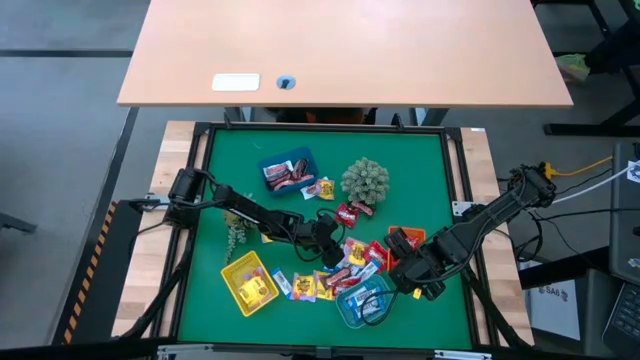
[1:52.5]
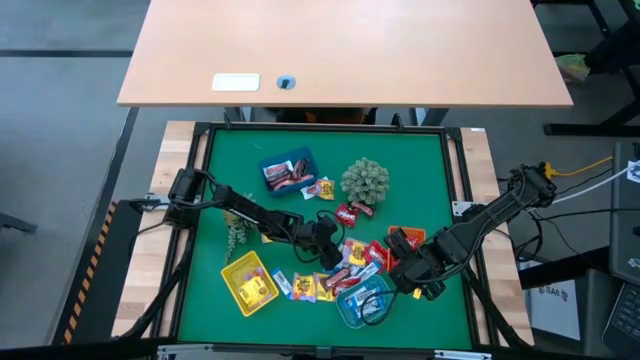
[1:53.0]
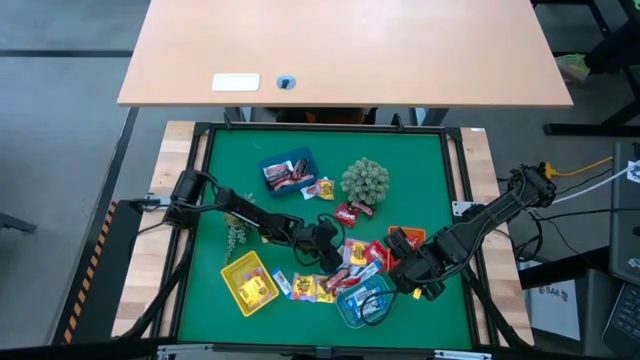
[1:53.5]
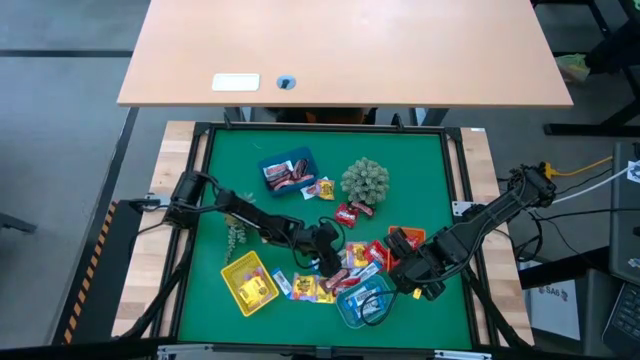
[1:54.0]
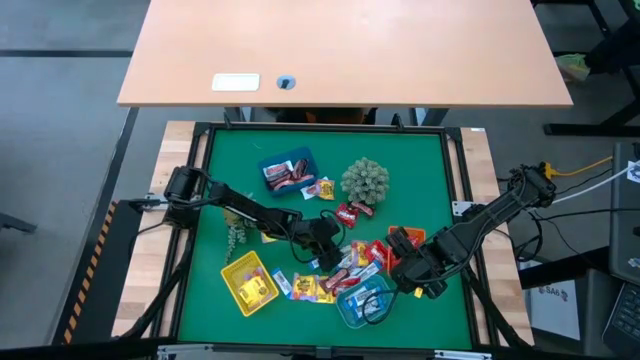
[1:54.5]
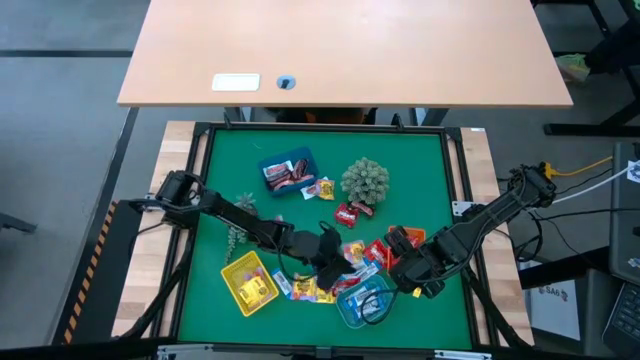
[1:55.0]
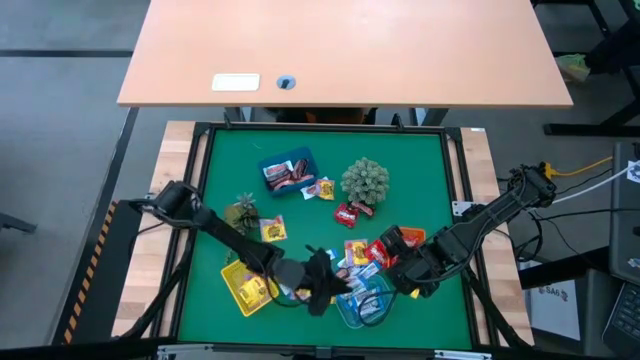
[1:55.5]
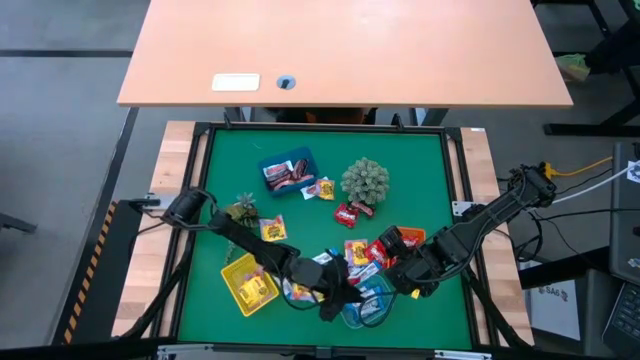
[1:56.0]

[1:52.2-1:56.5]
Task: Sort candy
Put the white-blue chocolate into the light blue bin

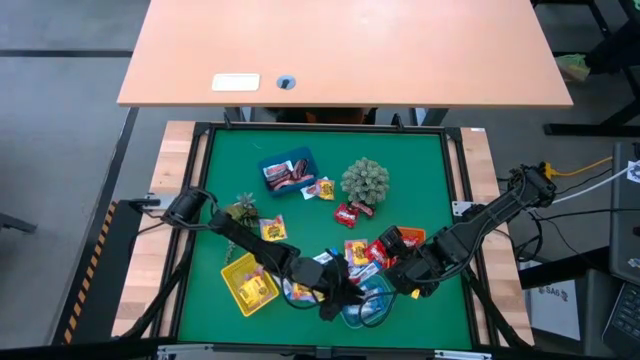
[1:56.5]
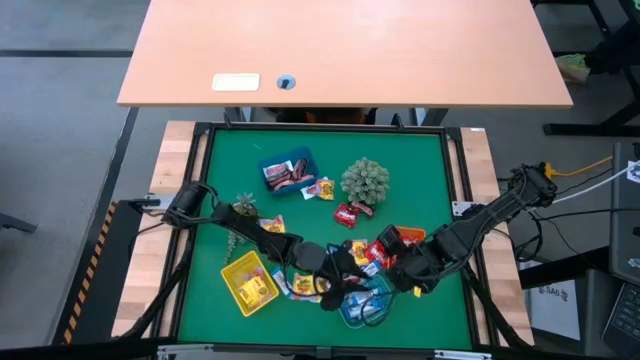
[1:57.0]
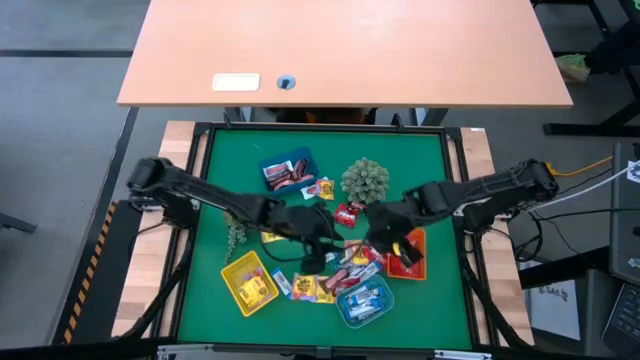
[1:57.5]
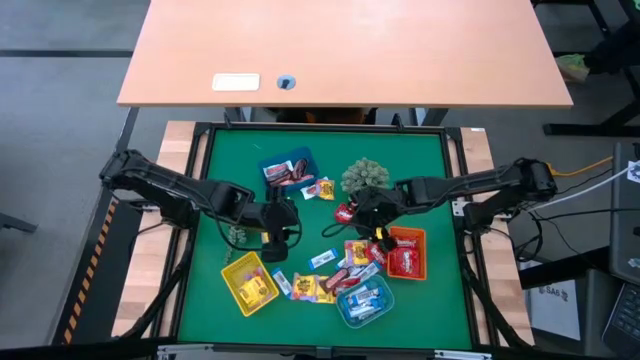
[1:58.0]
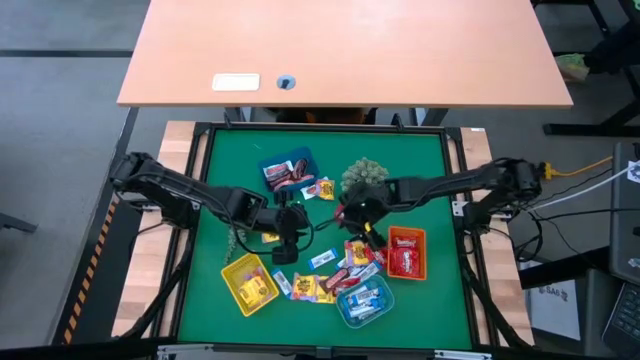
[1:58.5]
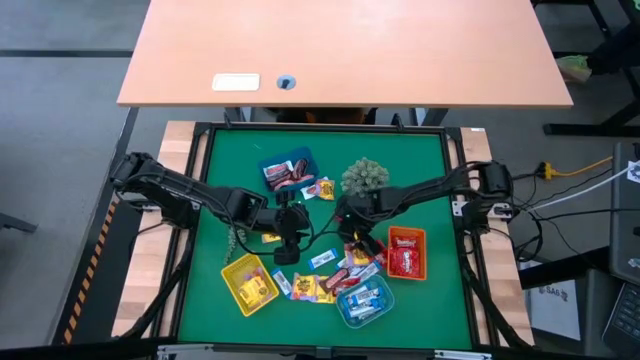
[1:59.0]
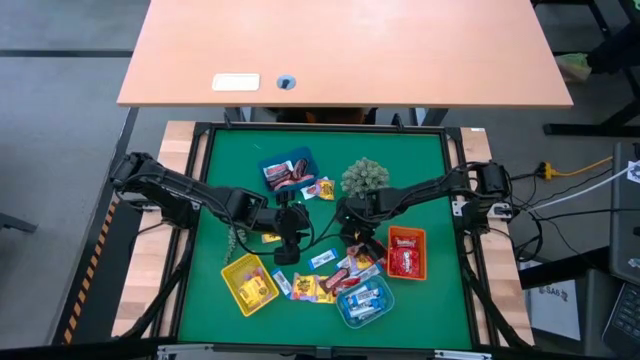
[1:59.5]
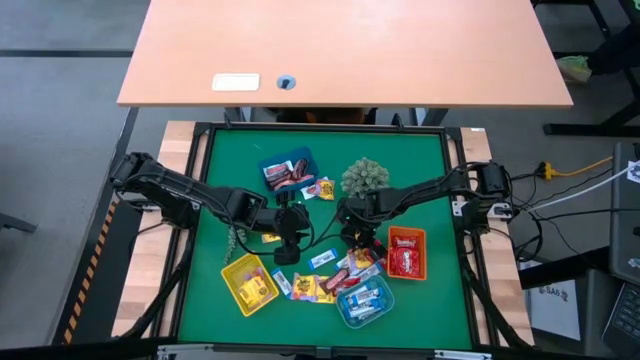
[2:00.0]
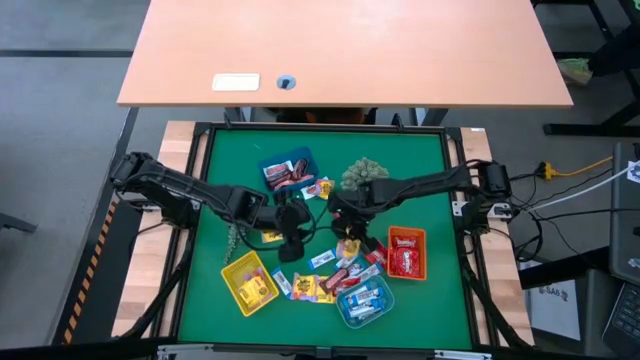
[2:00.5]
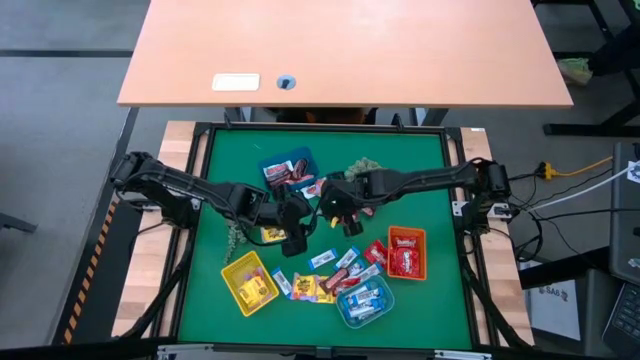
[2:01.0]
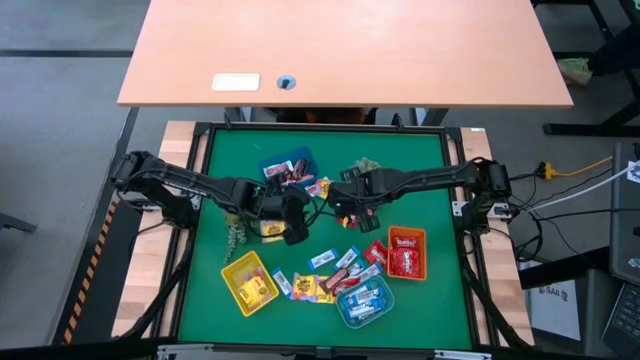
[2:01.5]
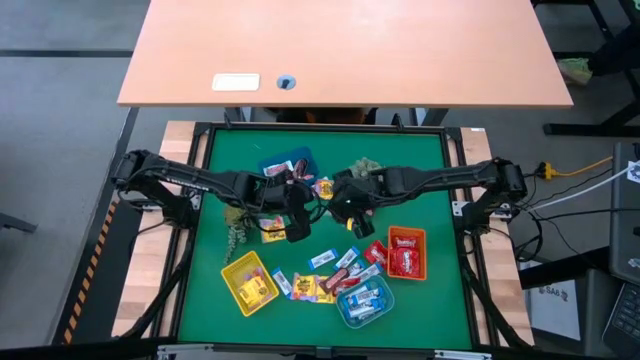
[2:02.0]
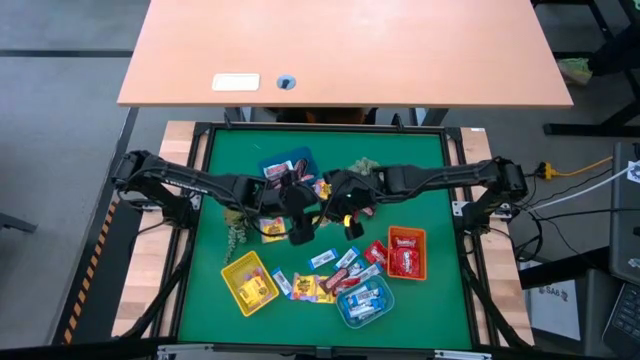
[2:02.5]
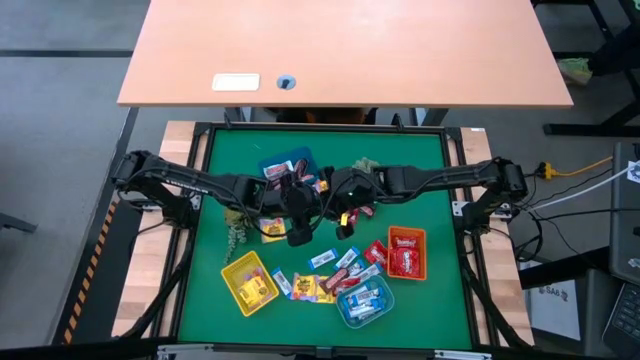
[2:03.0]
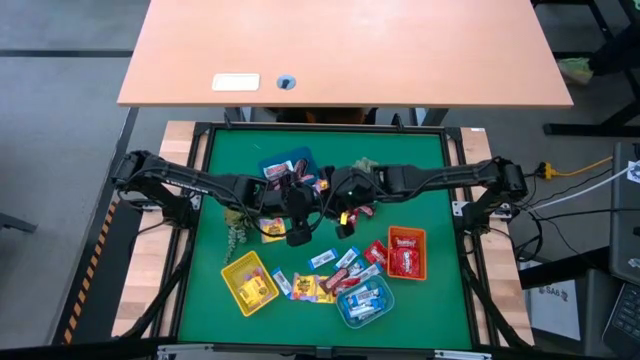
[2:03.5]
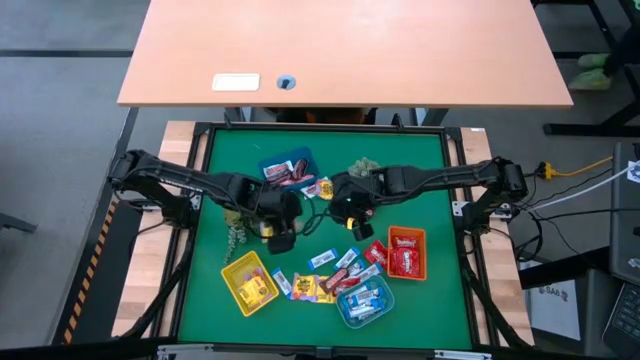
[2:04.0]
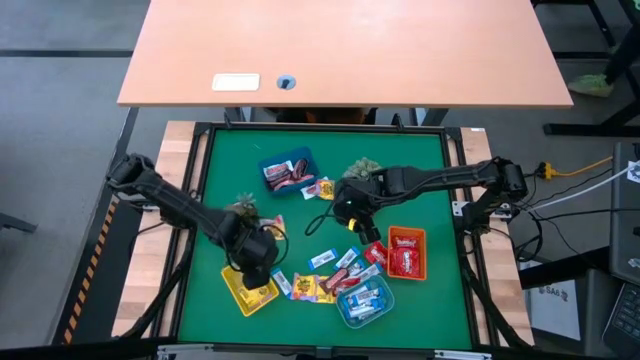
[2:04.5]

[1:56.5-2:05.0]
Put the yellow candy into the yellow bin

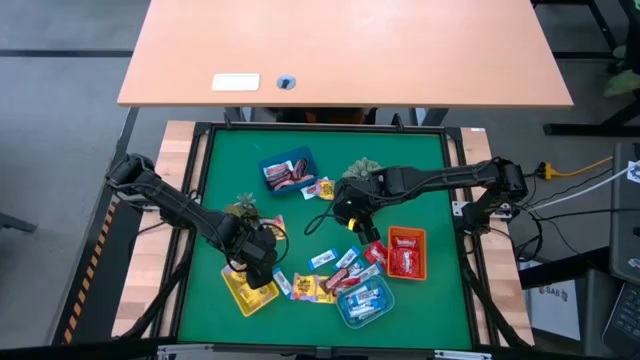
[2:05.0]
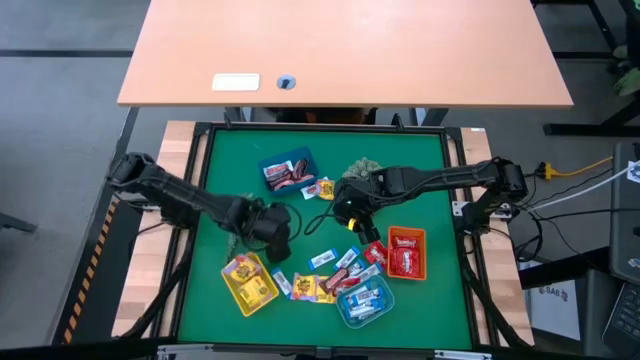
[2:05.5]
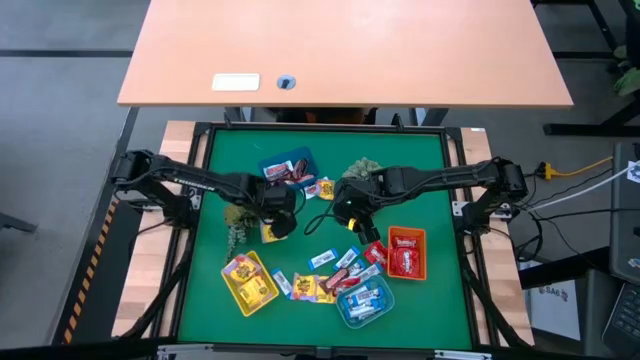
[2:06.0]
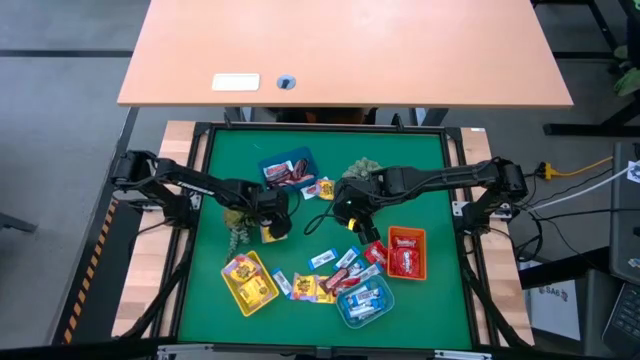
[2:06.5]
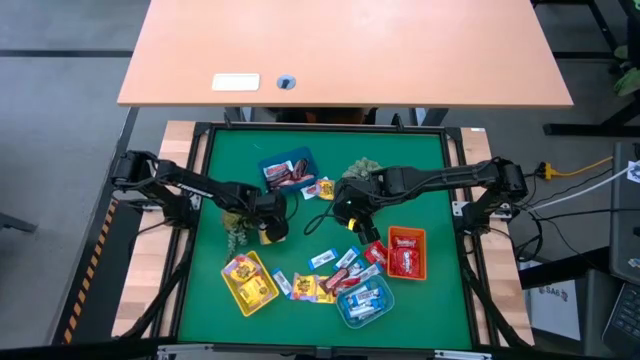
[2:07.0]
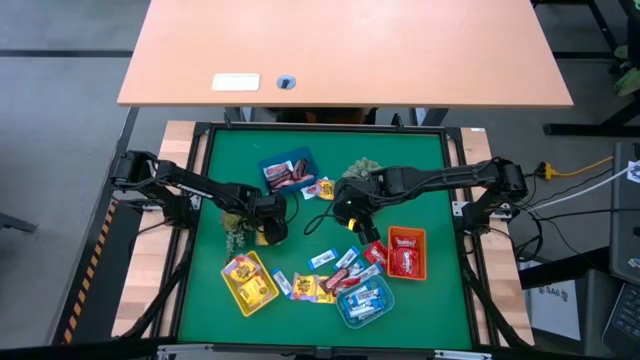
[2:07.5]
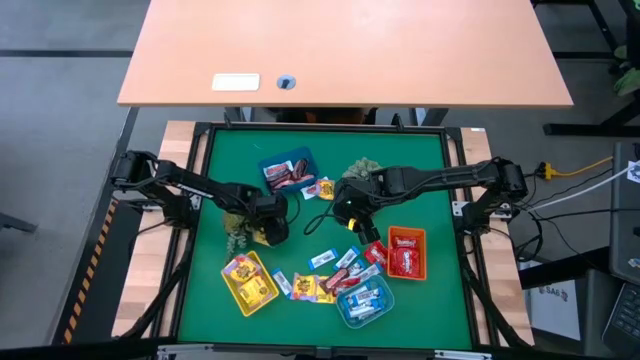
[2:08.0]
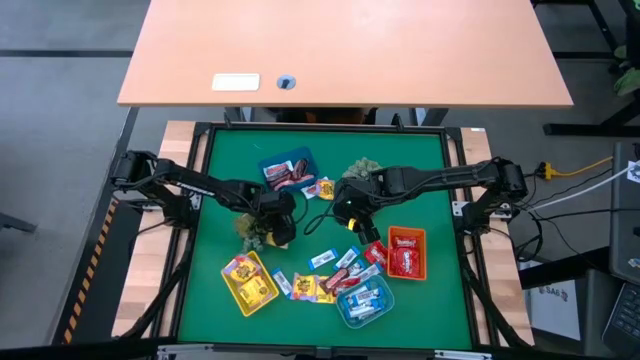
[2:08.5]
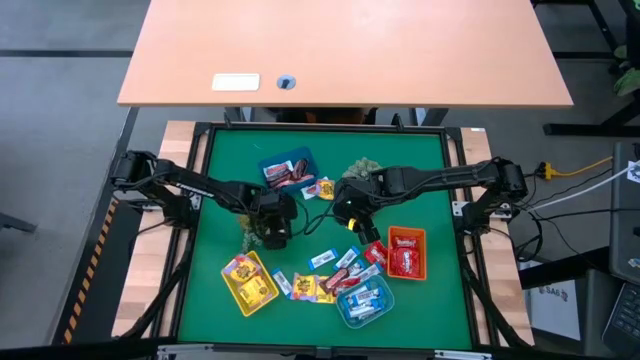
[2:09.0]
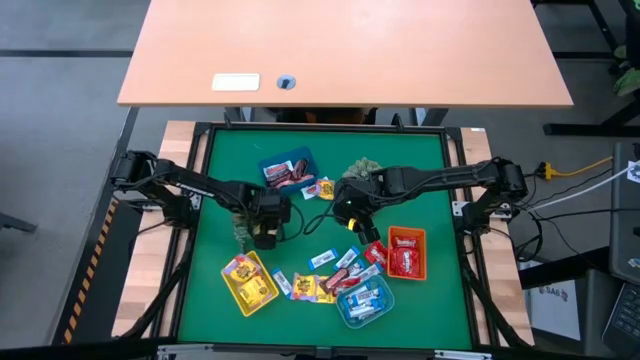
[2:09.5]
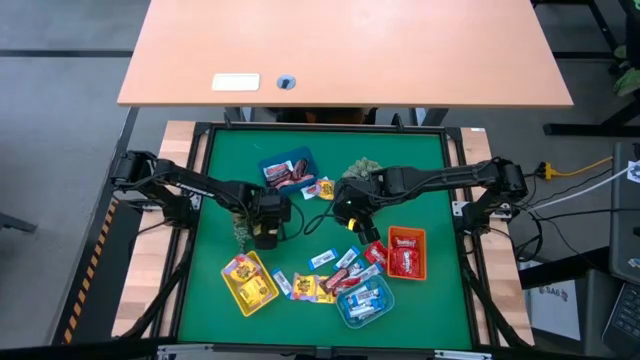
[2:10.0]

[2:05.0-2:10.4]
Put the yellow candy into the yellow bin

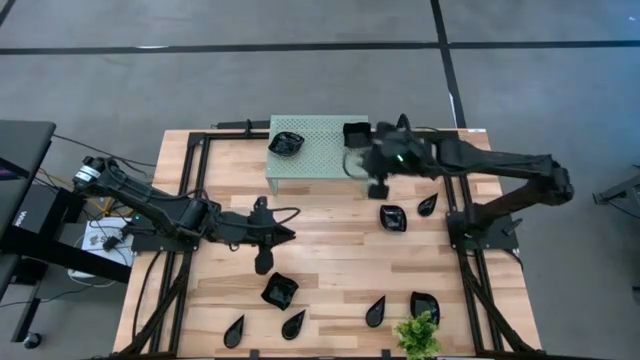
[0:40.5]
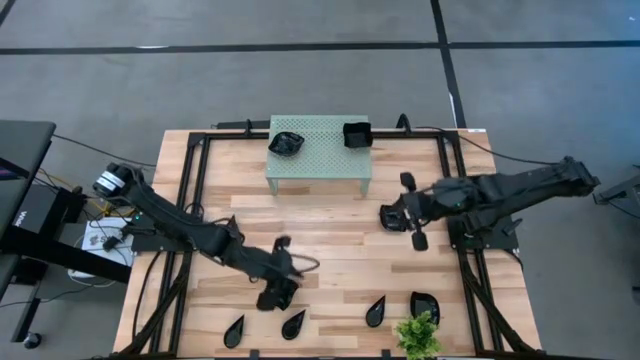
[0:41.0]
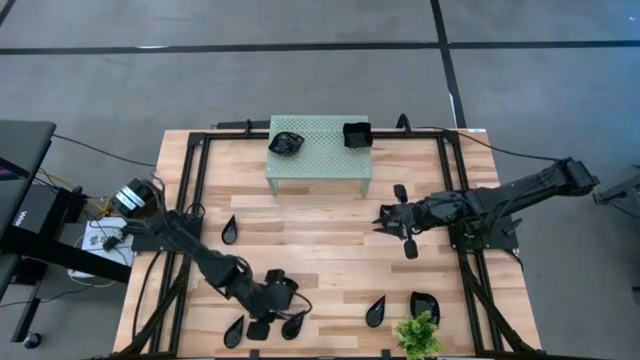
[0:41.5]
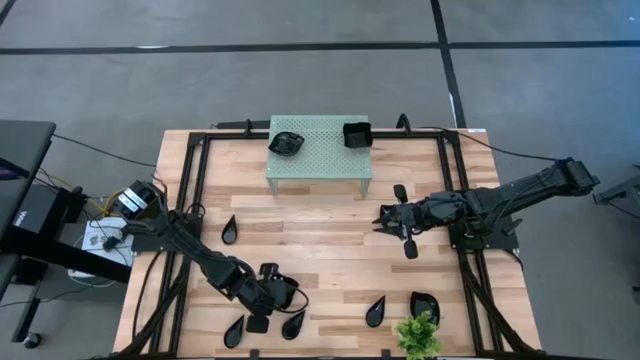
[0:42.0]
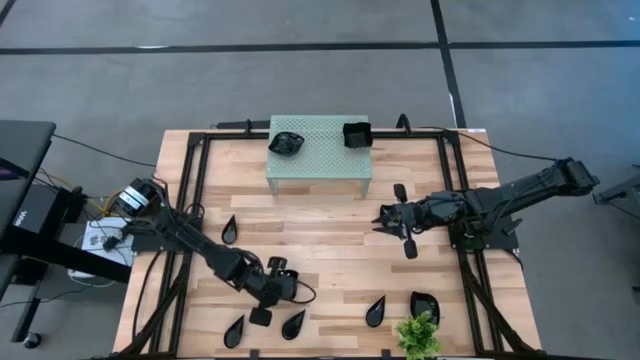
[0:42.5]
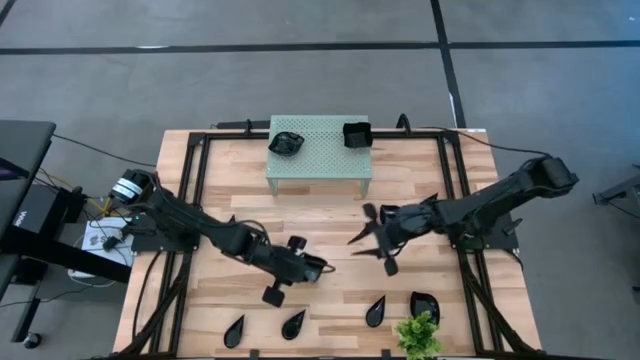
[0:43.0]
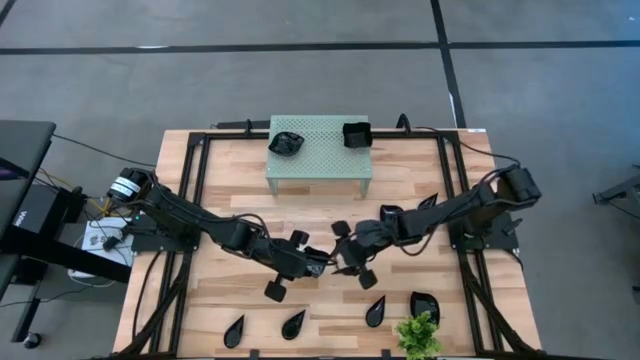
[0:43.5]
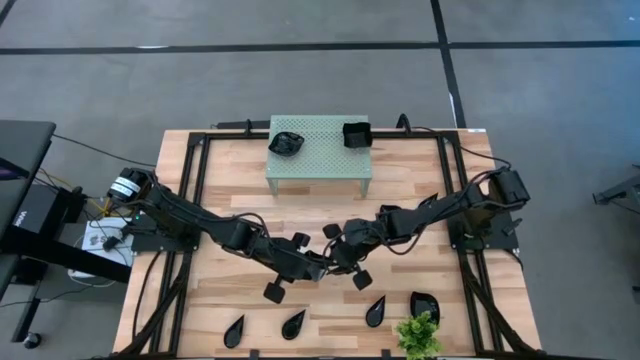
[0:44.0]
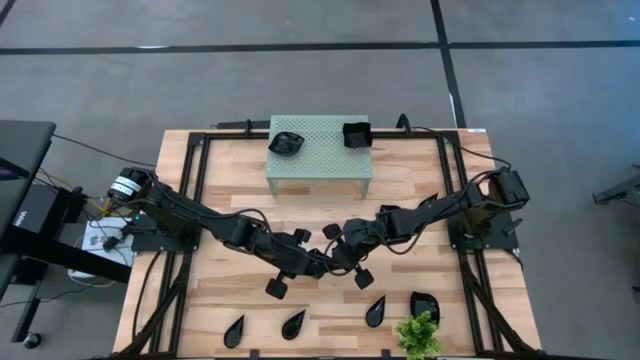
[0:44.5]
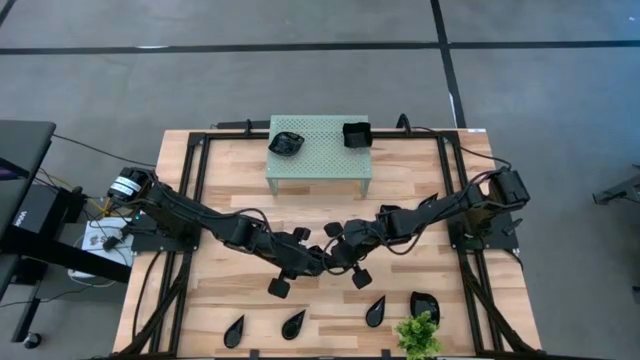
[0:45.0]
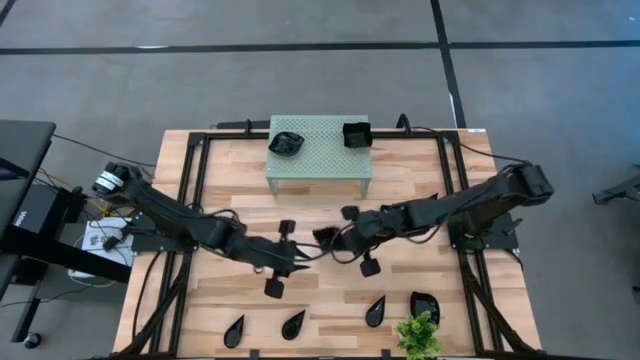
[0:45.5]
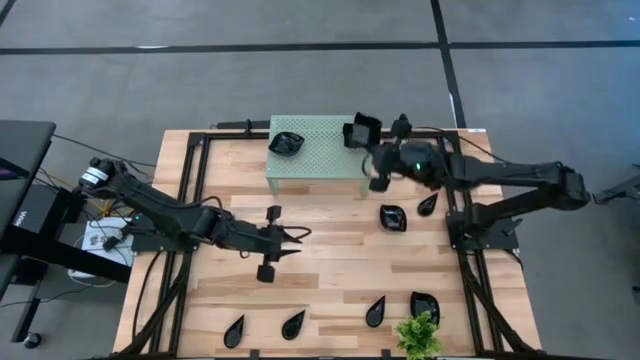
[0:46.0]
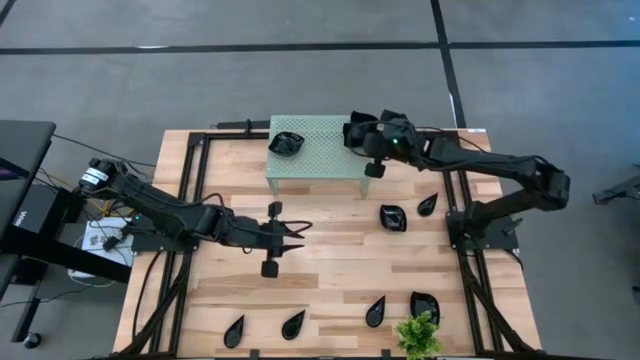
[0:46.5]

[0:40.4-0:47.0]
Task: Pick & Place Mini shaped plates
Stack the distorted square plate on top of the other distorted square plates on the shelf
